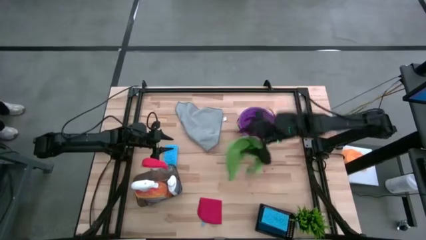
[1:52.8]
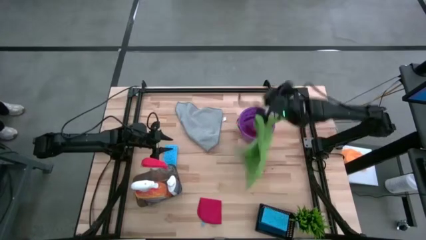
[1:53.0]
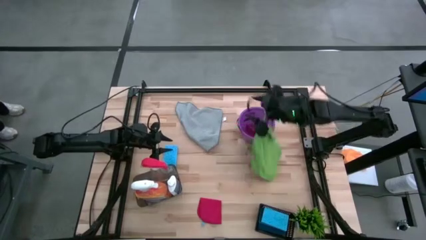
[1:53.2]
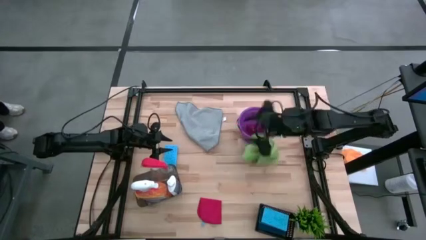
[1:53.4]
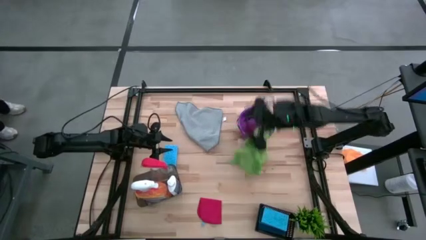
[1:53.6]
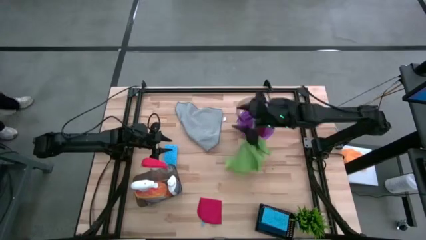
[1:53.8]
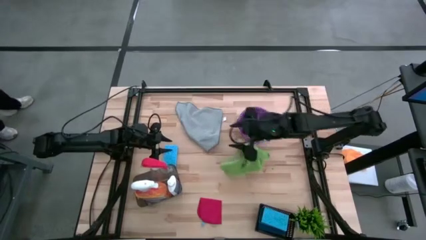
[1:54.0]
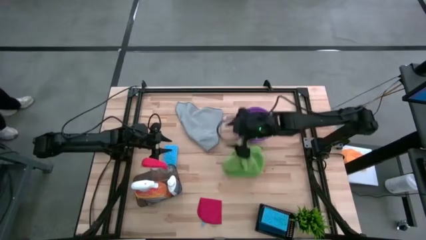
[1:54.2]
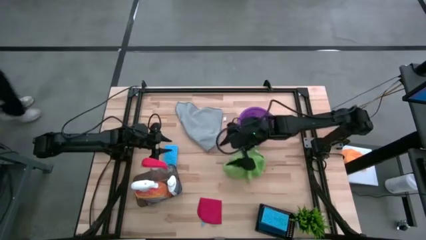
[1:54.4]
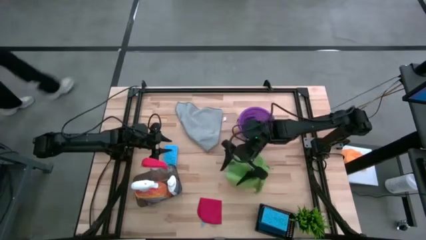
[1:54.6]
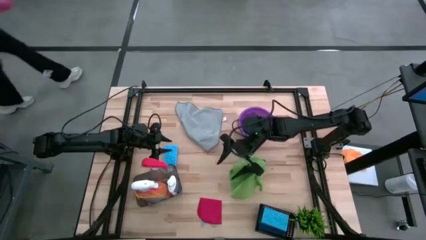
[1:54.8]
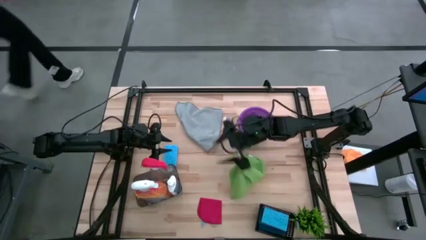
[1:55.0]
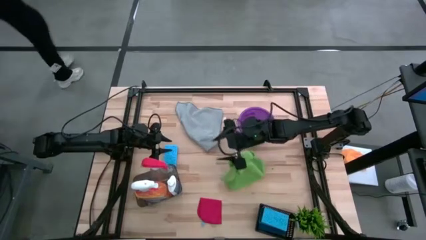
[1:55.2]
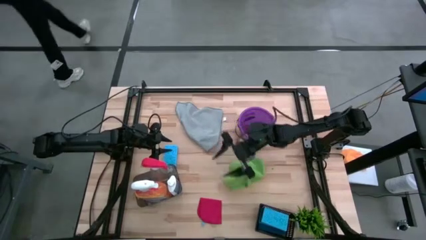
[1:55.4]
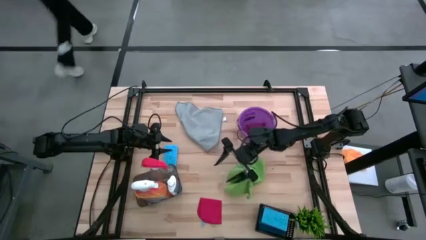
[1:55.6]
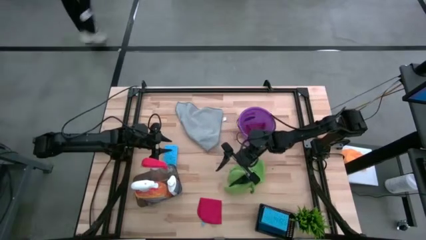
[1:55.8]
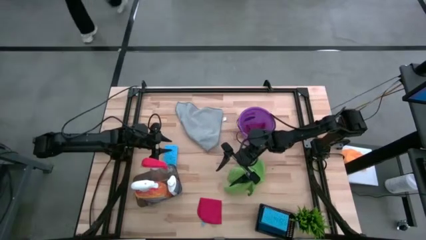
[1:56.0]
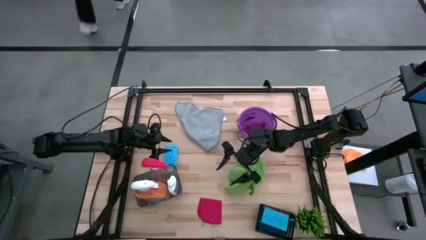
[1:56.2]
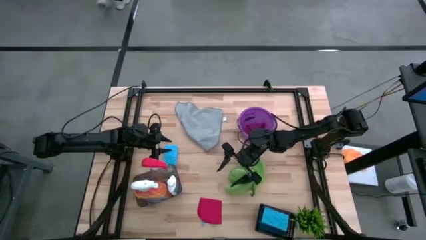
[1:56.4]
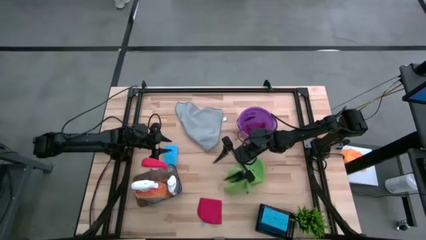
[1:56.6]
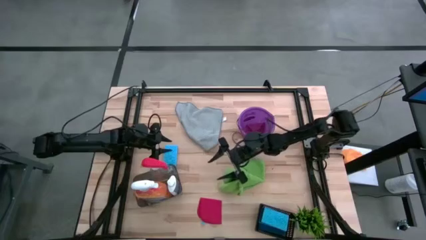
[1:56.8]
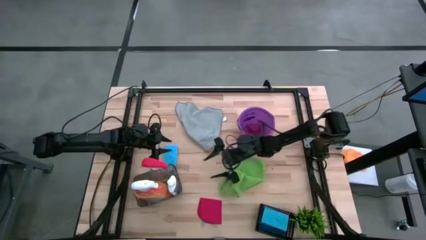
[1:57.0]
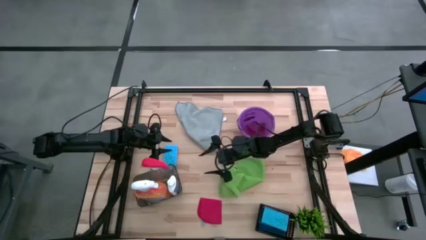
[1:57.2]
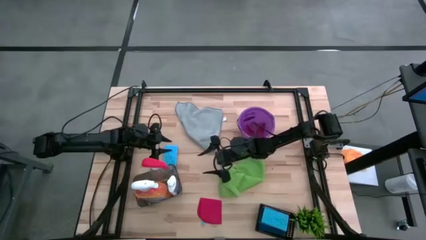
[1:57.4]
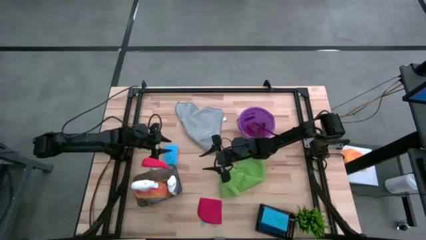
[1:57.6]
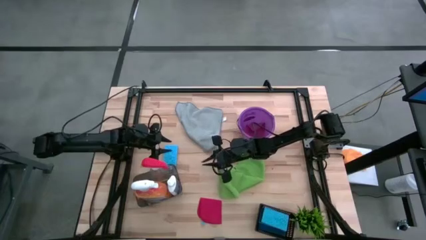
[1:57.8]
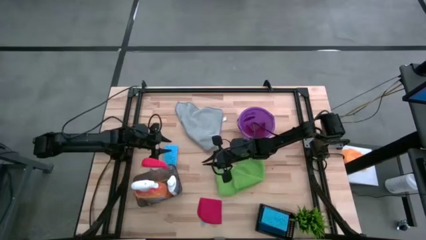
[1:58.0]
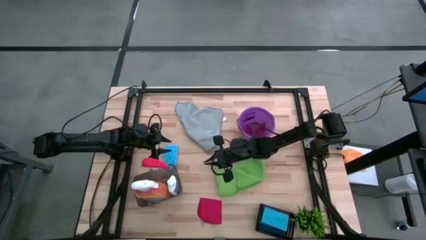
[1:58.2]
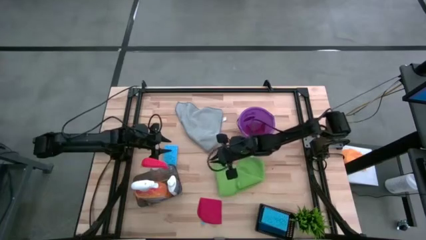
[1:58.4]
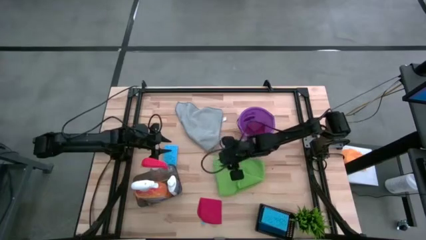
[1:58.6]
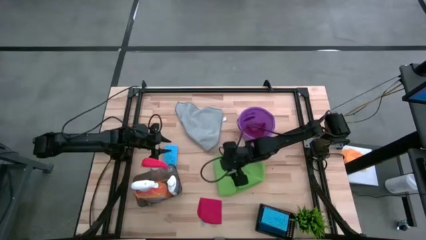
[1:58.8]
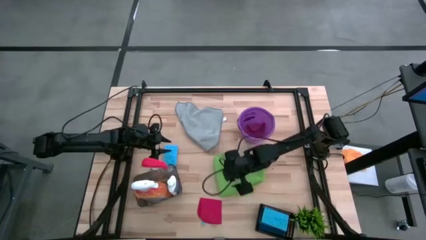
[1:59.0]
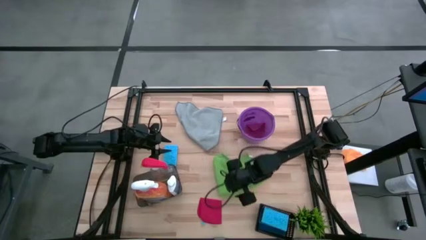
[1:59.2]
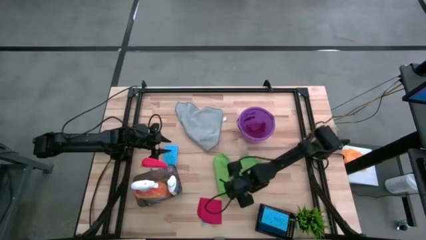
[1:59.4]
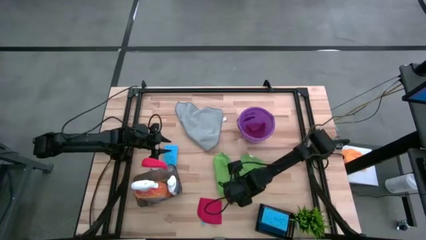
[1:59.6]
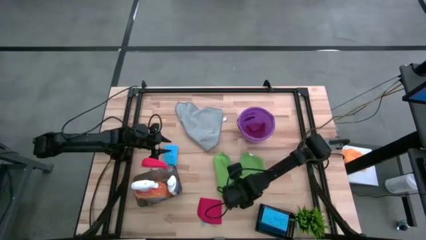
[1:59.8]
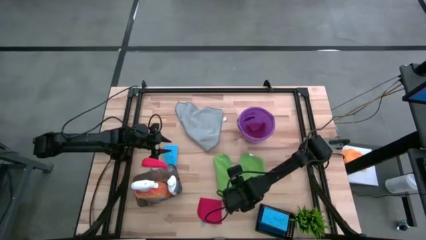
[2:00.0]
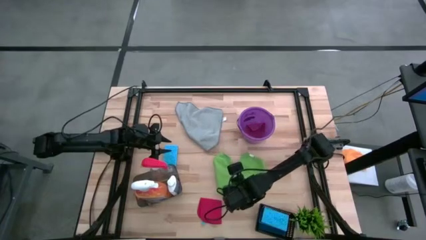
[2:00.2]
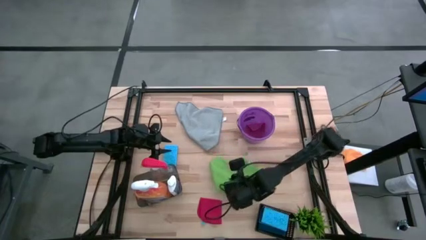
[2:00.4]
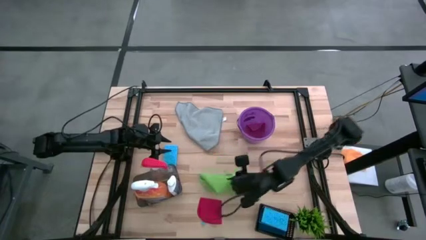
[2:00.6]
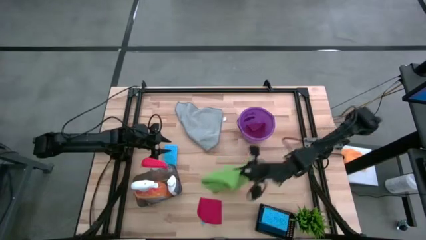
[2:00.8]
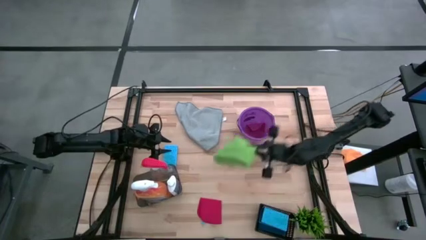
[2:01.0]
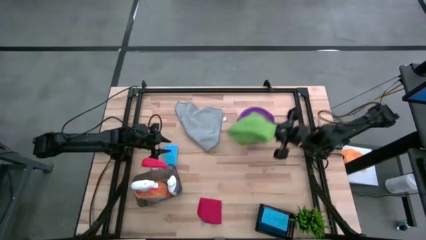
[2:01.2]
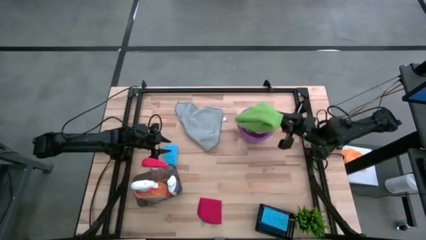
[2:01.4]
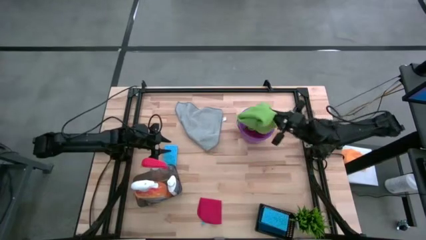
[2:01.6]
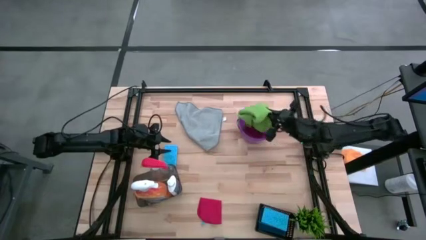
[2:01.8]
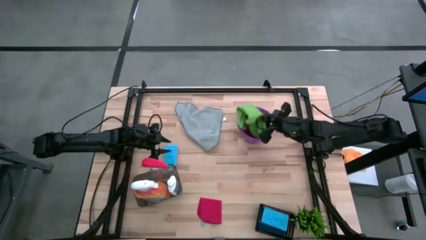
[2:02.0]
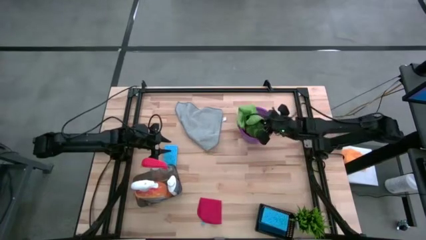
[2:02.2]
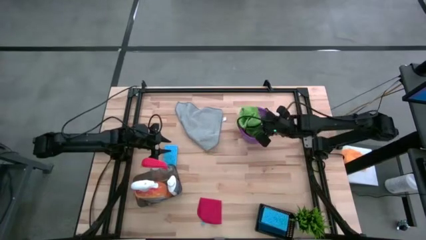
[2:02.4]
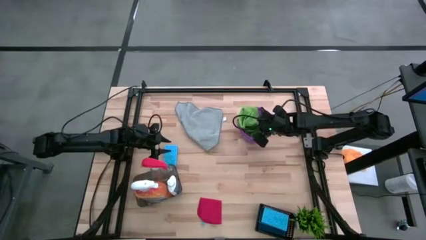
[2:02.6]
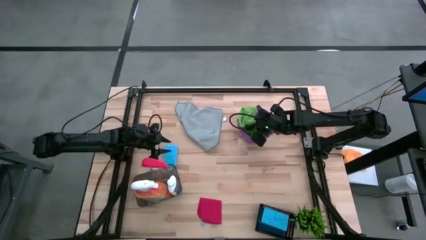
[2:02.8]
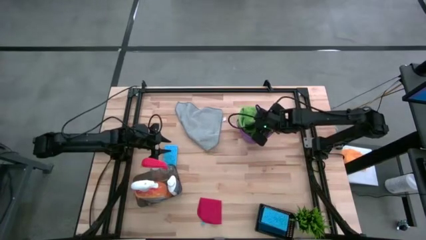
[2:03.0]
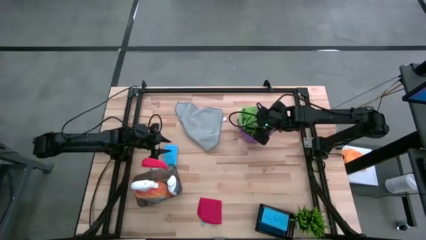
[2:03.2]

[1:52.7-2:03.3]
Task: Pick & Place Kitchen Items
Put the green microfiber towel into the purple bucket
